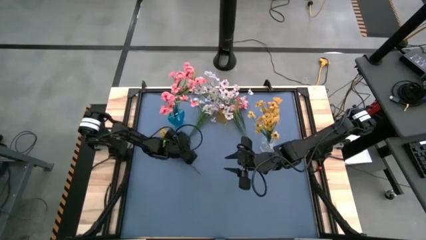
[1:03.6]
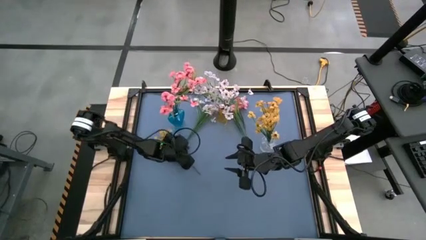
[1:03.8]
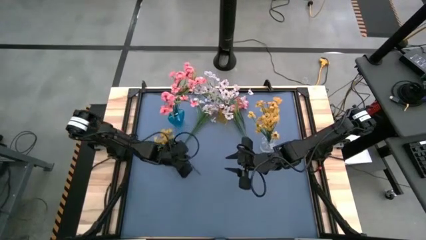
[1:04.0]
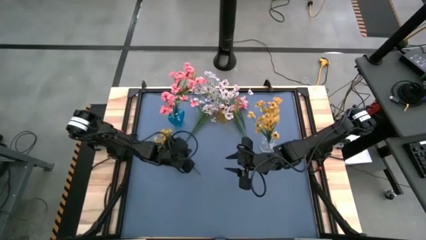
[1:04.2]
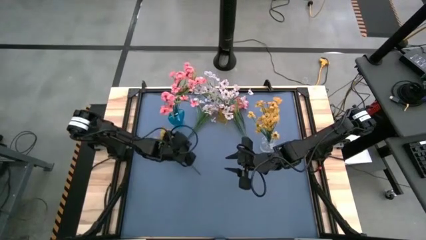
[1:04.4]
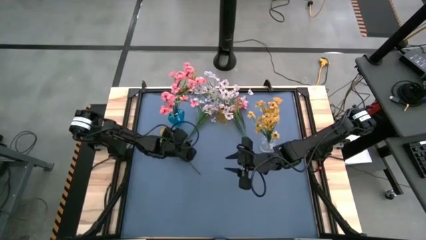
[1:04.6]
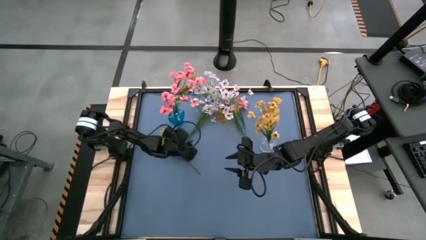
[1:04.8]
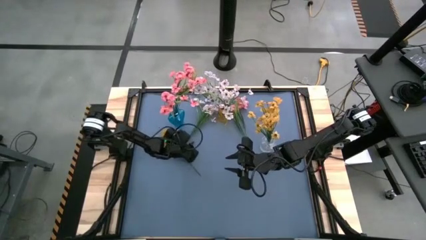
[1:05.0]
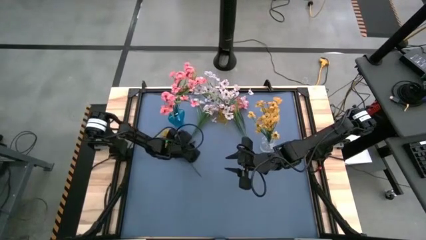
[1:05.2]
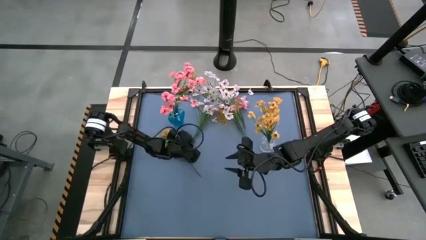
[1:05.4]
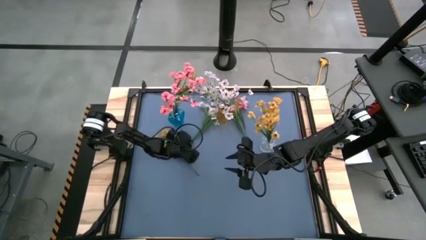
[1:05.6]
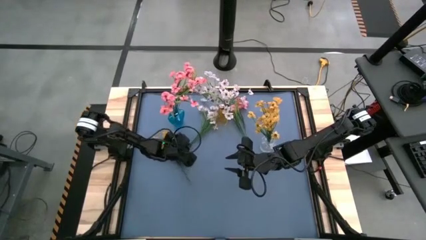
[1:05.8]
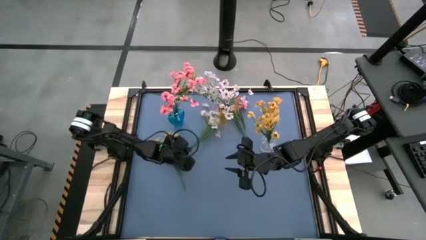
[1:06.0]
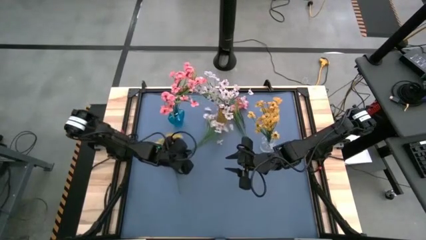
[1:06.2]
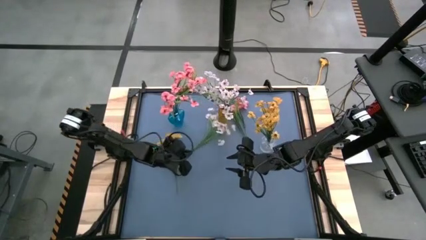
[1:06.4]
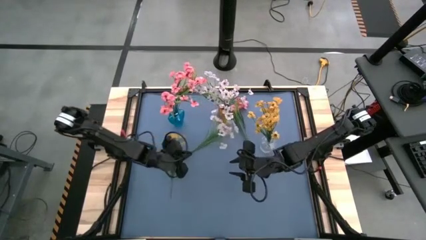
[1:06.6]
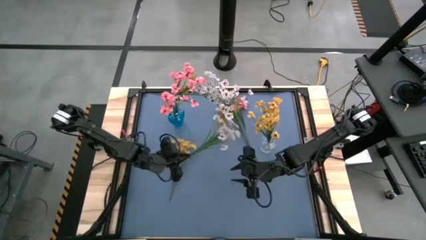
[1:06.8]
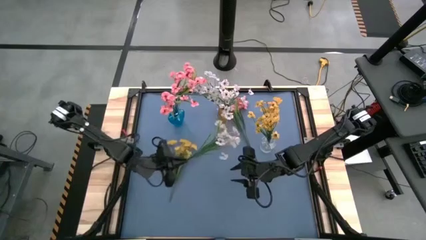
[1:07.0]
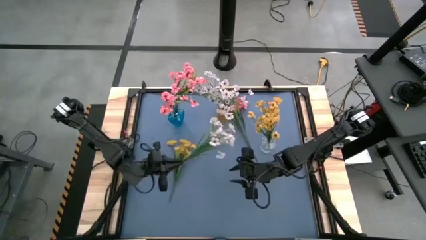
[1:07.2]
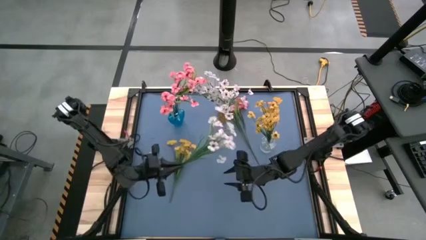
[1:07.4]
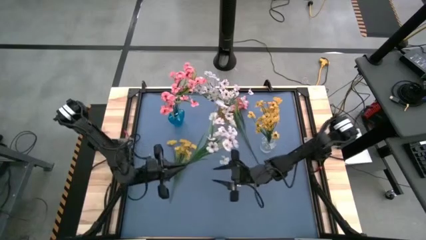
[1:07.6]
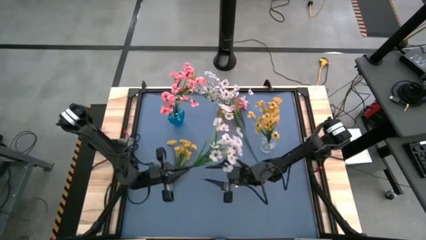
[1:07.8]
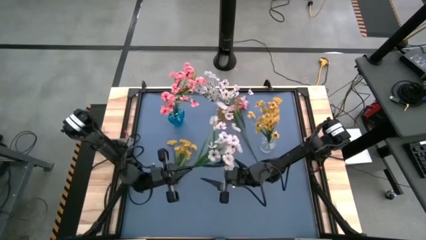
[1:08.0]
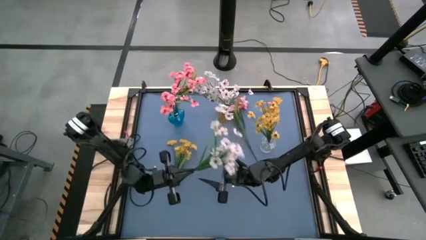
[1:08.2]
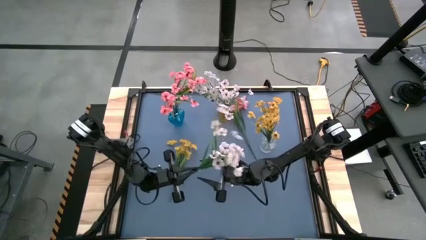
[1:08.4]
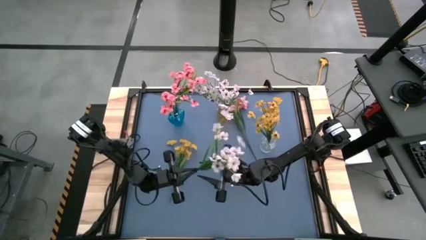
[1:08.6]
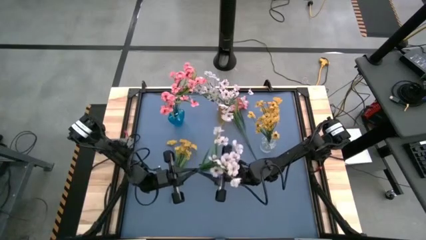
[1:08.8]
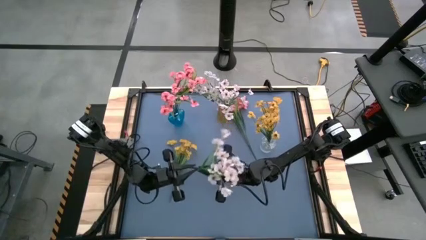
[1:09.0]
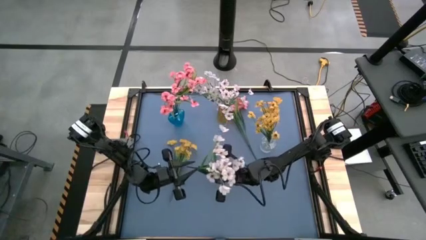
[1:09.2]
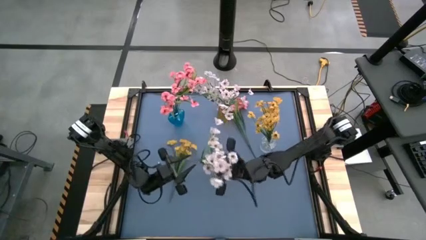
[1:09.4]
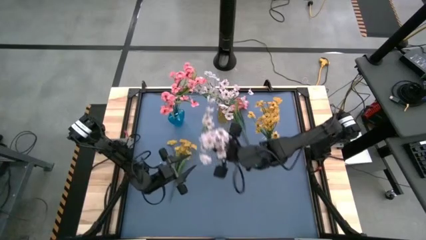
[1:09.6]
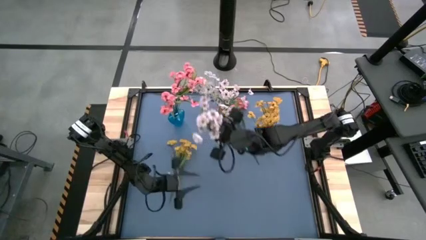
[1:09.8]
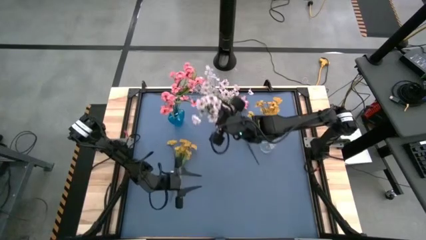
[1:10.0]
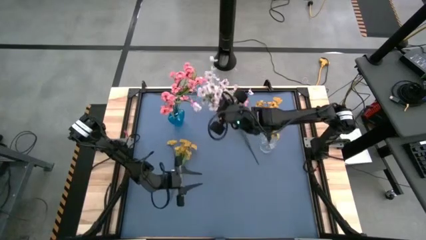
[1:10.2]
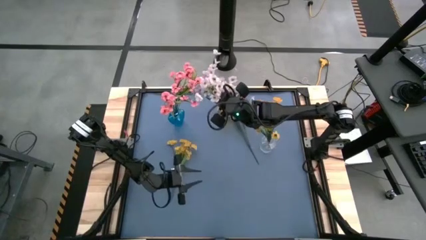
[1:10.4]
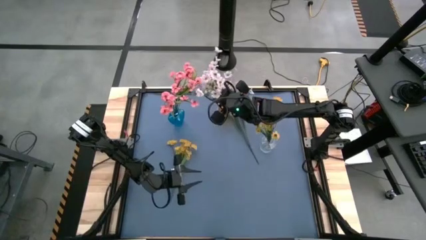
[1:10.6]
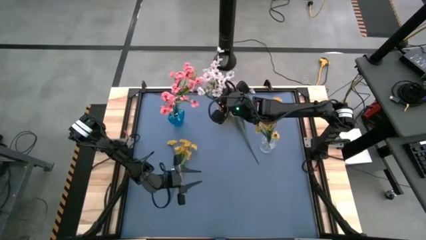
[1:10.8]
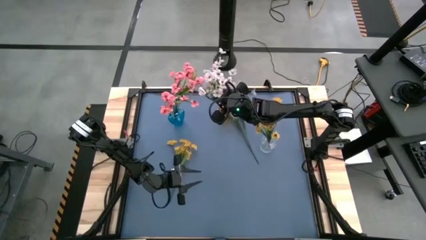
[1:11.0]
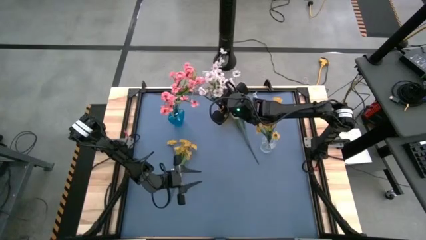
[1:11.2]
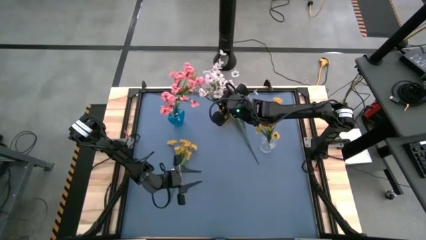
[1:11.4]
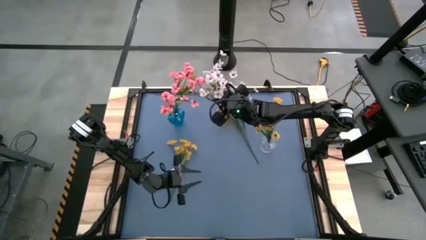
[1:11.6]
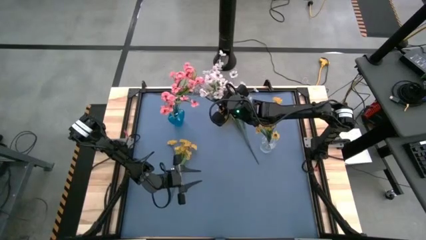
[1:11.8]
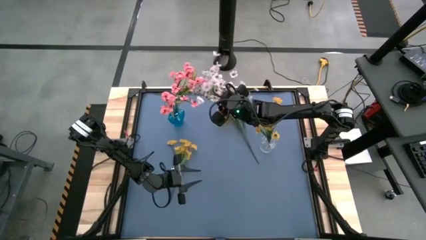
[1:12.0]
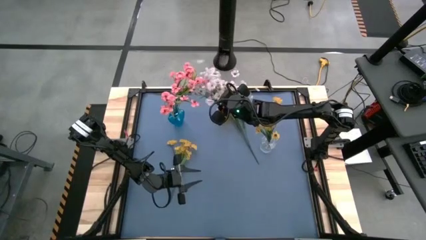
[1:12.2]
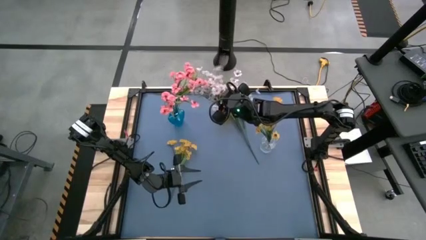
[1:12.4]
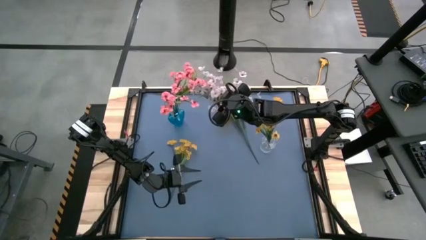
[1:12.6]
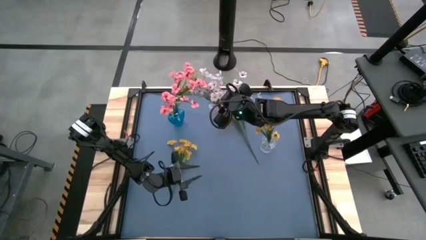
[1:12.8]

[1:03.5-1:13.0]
Task: Sort flowers into vase by color
Put the white flowers into the yellow vase

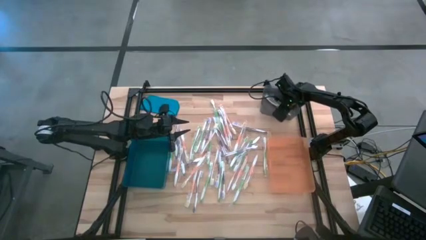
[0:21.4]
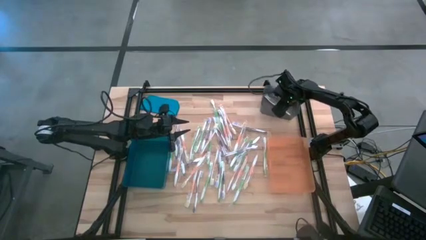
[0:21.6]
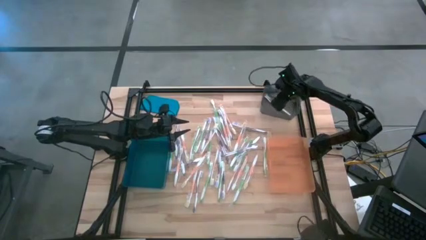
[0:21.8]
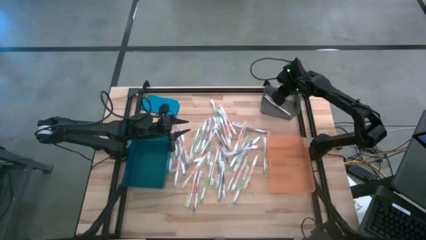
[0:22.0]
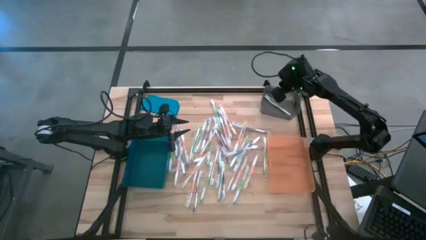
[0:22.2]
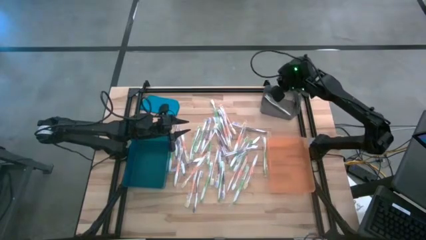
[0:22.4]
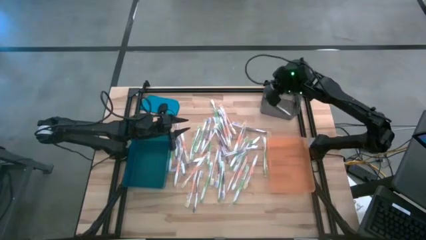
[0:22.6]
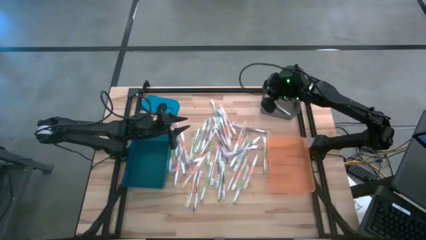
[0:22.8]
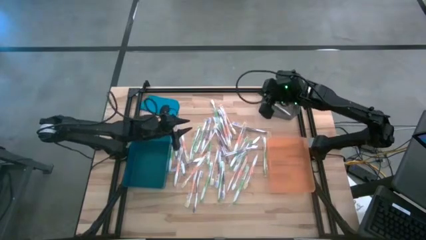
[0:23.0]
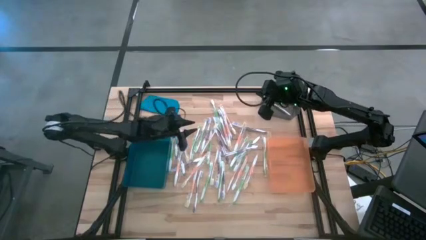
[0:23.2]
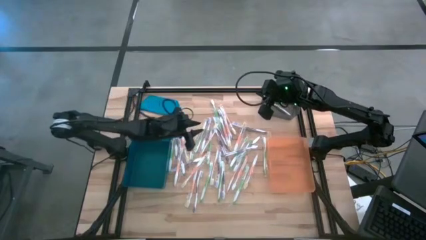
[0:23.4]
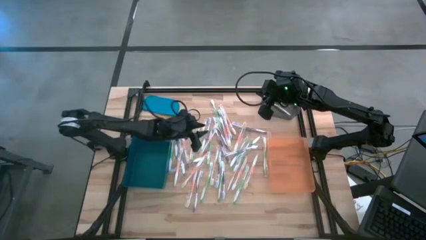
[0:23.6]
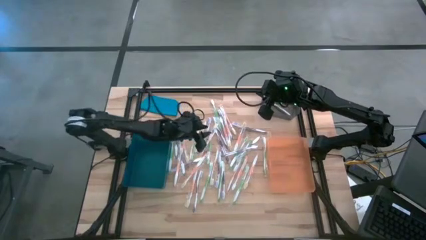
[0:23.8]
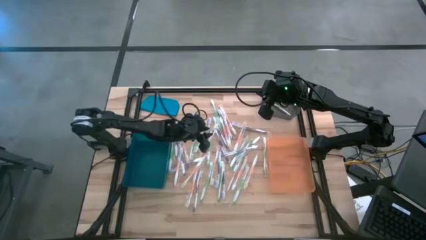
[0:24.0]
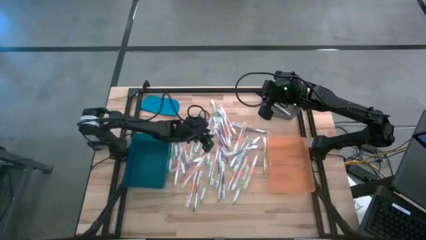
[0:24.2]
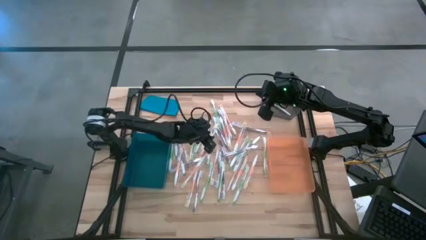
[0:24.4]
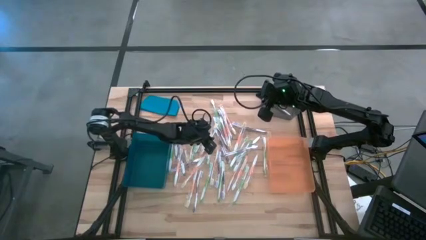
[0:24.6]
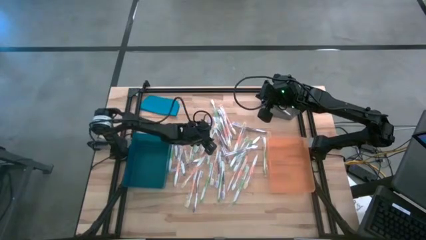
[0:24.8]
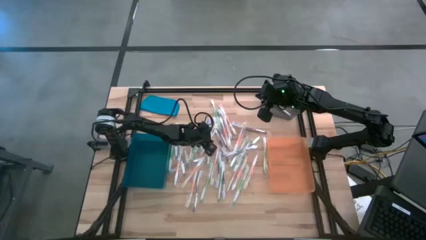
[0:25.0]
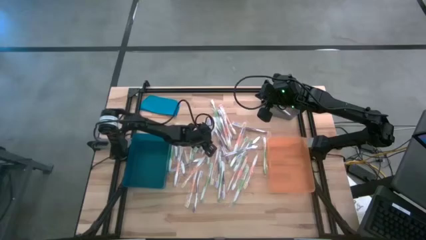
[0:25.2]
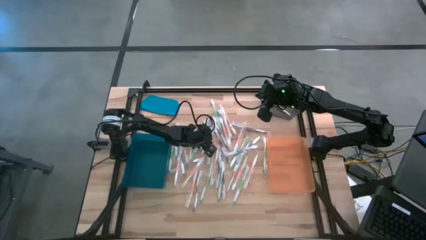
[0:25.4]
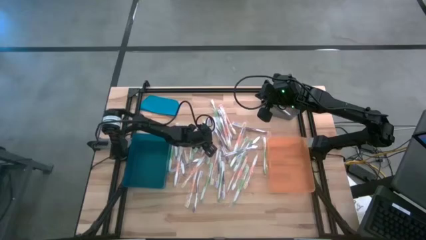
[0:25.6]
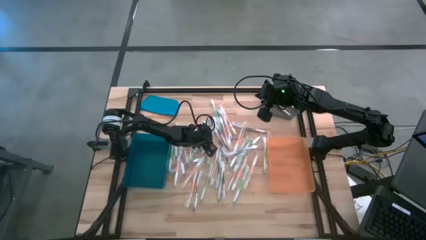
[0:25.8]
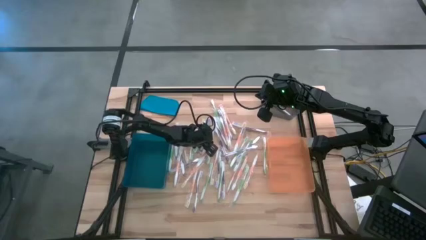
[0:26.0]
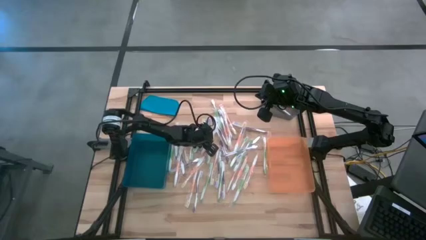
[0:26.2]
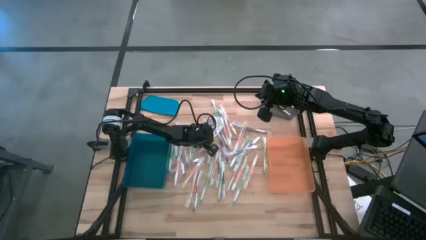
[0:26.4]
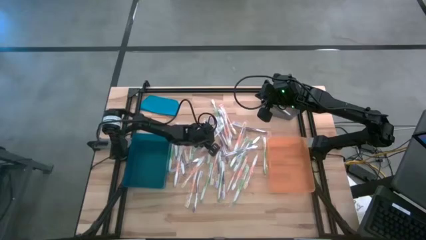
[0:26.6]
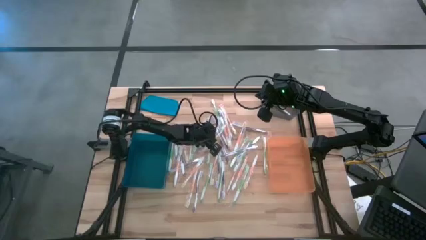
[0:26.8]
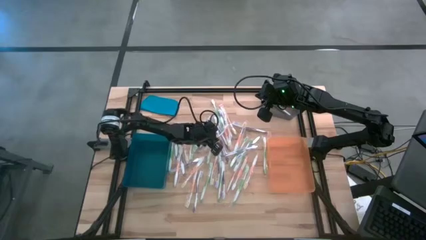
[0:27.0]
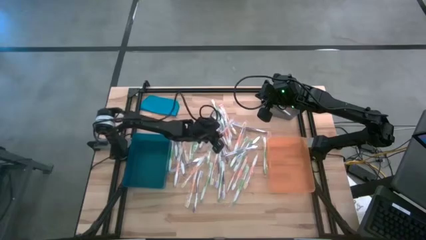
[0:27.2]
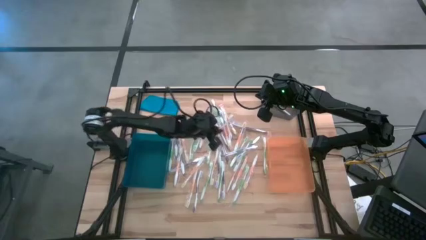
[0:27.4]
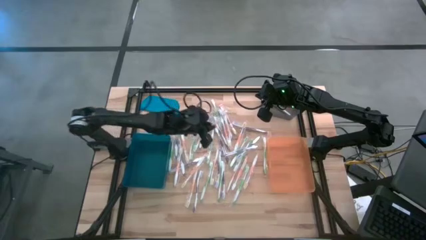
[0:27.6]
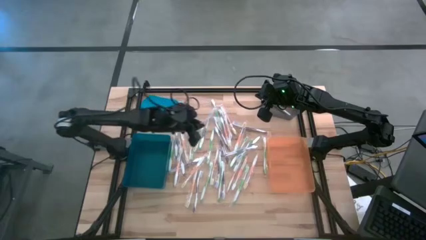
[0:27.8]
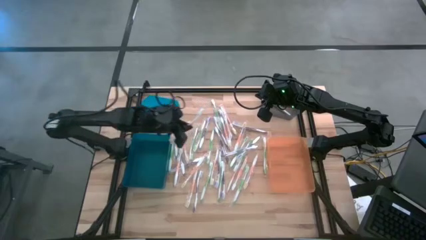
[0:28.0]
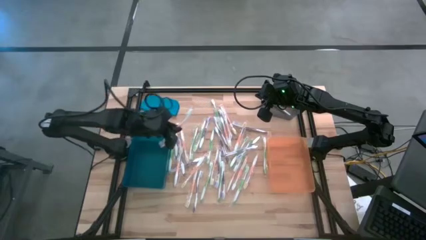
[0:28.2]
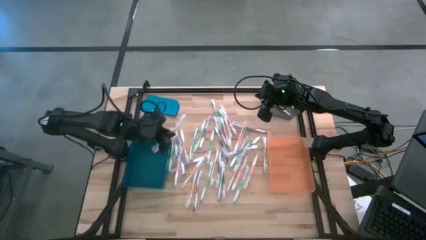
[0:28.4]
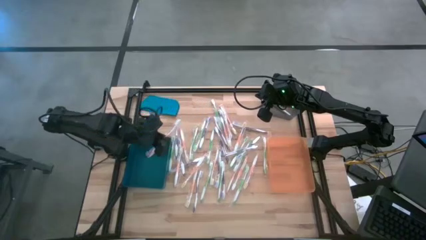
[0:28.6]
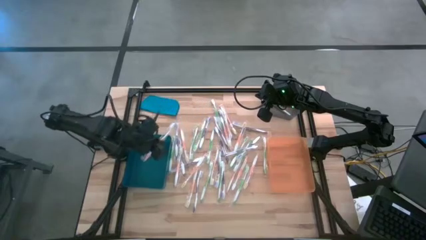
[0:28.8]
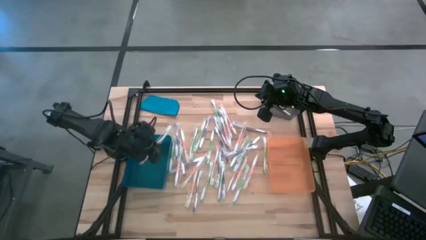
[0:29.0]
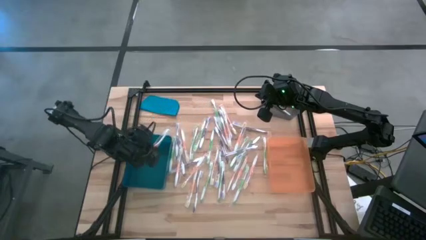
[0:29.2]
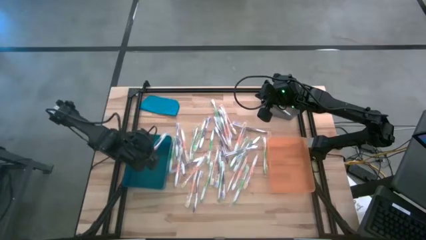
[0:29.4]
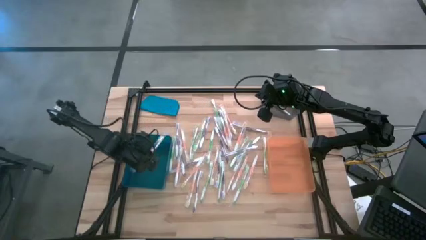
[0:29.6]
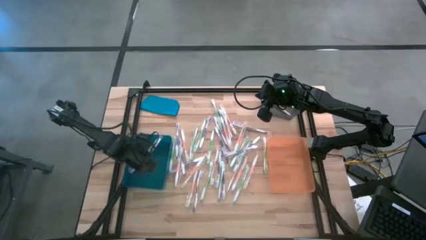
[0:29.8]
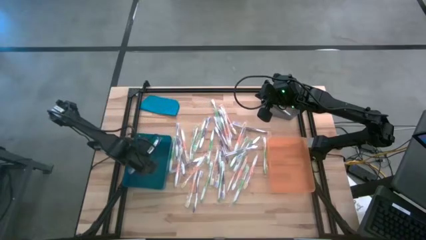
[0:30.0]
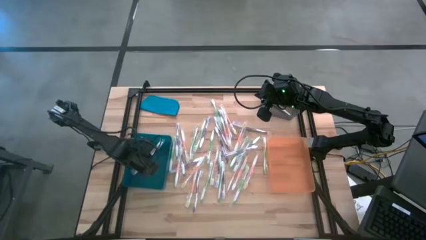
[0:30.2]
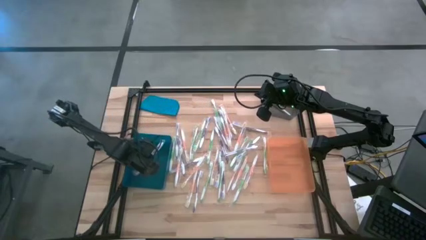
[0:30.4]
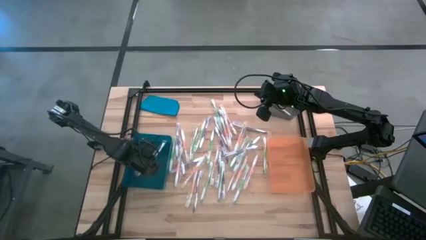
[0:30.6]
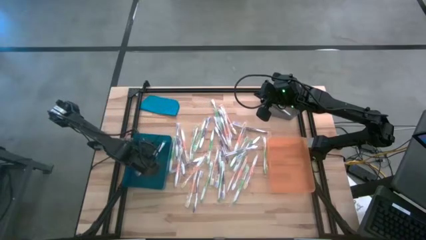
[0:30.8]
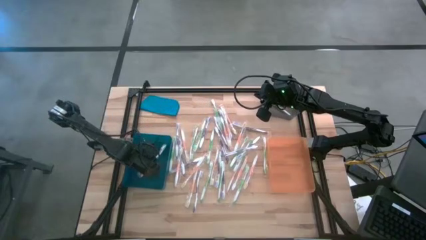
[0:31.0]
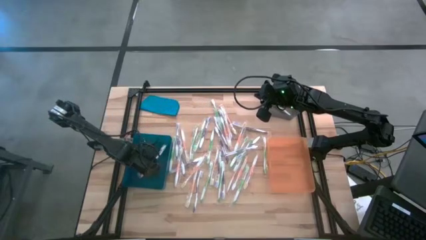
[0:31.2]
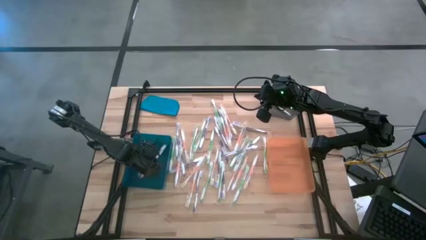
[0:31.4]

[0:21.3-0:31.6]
Task: Pick & Place Toothbrushes
Put the orange toothbrush into the blue bin
